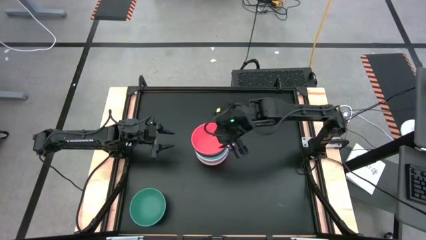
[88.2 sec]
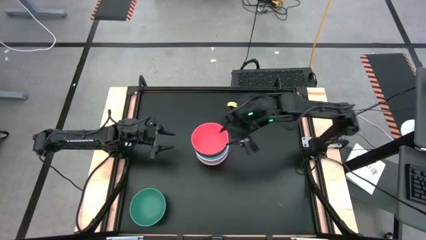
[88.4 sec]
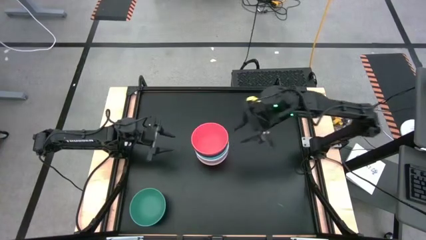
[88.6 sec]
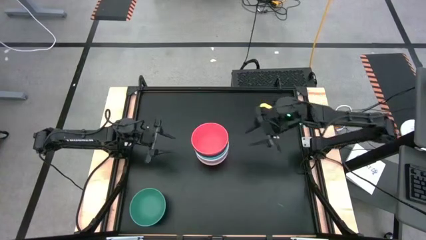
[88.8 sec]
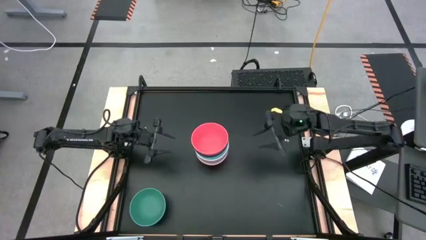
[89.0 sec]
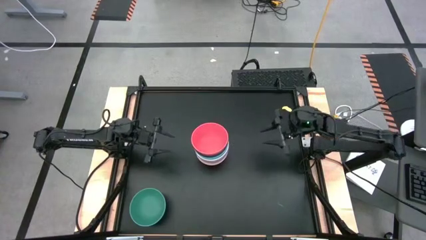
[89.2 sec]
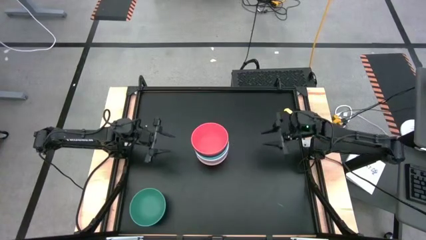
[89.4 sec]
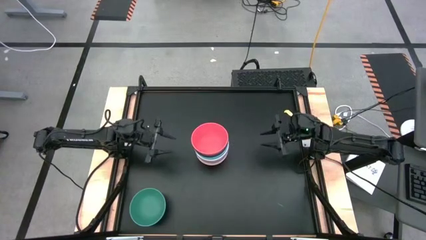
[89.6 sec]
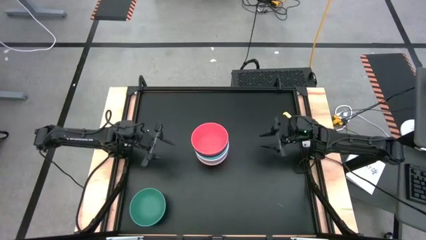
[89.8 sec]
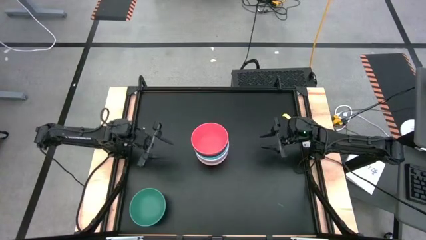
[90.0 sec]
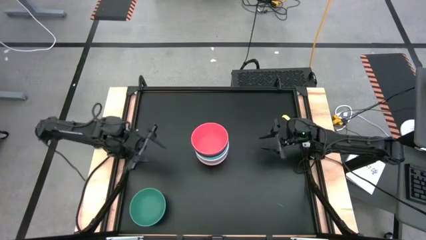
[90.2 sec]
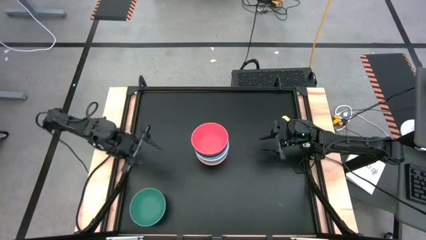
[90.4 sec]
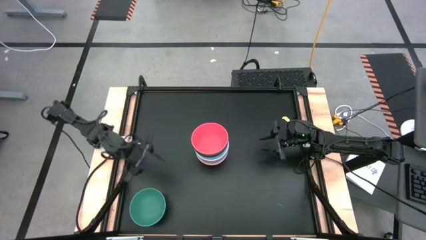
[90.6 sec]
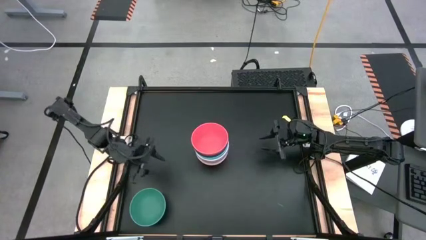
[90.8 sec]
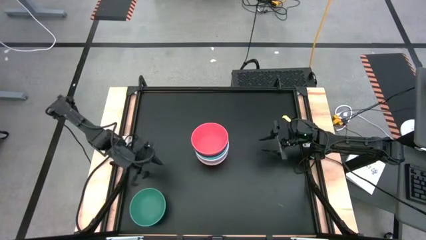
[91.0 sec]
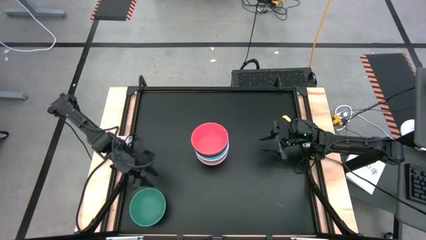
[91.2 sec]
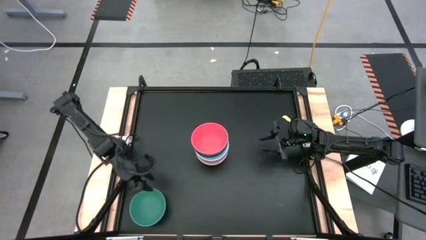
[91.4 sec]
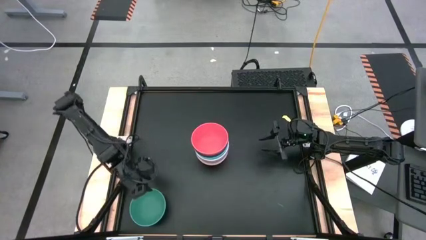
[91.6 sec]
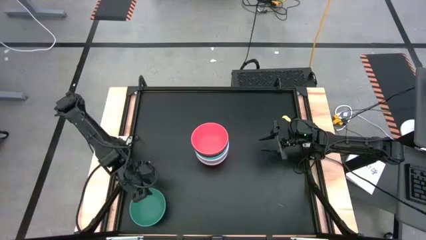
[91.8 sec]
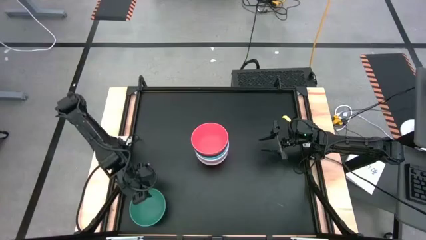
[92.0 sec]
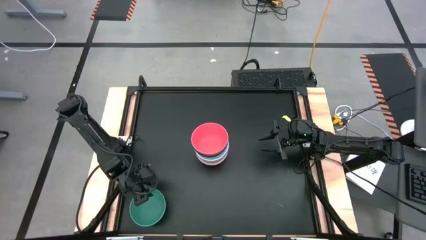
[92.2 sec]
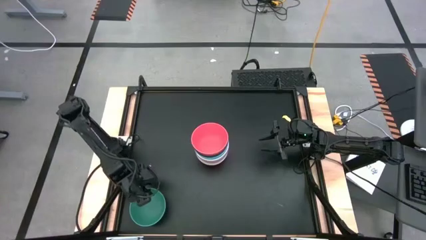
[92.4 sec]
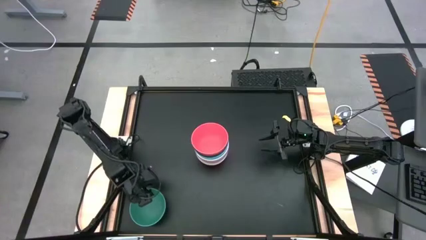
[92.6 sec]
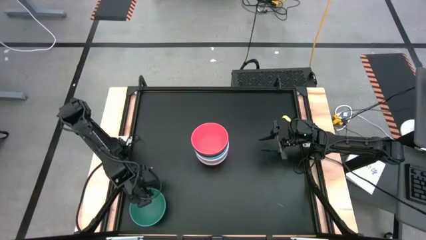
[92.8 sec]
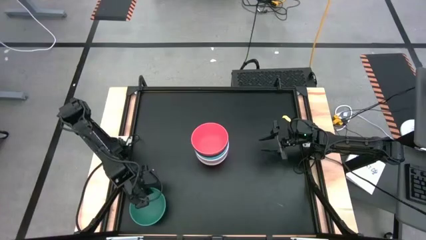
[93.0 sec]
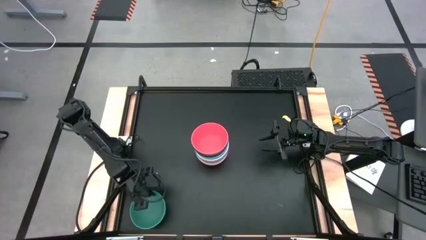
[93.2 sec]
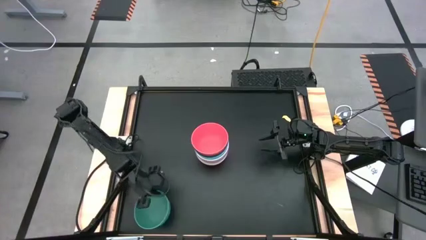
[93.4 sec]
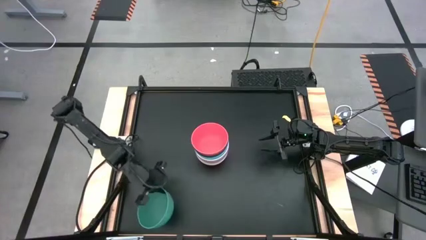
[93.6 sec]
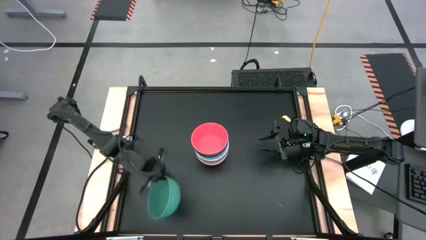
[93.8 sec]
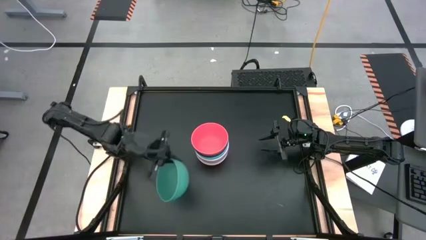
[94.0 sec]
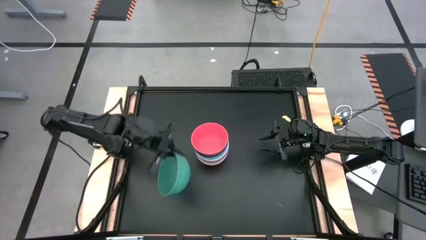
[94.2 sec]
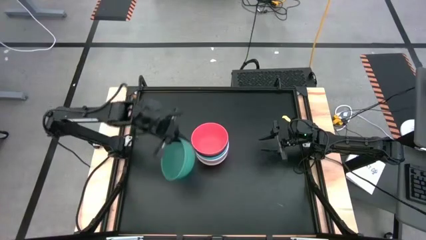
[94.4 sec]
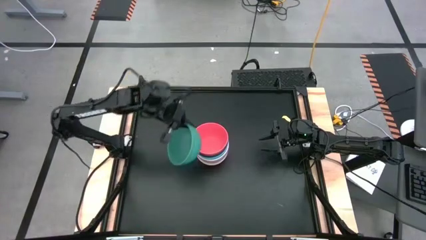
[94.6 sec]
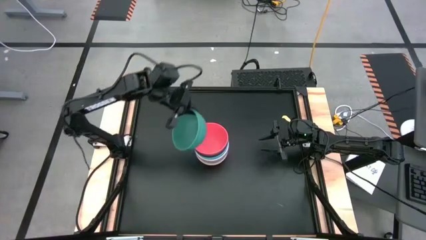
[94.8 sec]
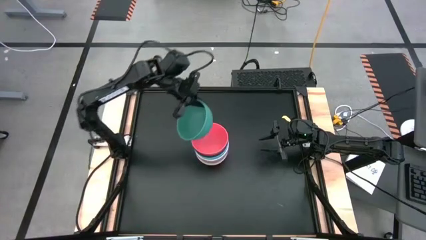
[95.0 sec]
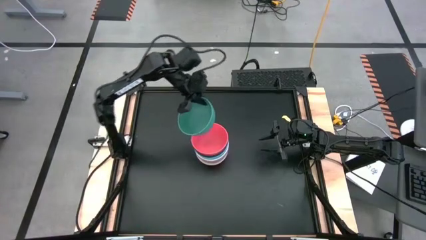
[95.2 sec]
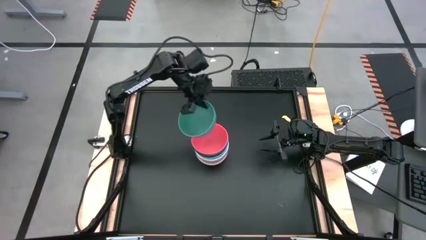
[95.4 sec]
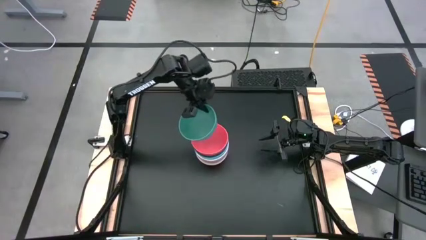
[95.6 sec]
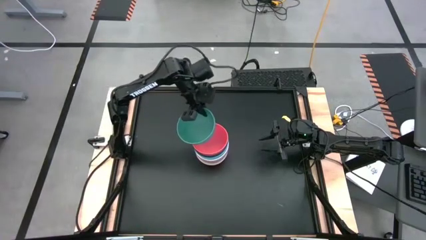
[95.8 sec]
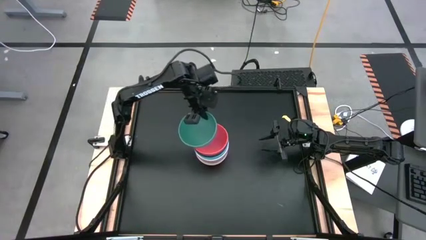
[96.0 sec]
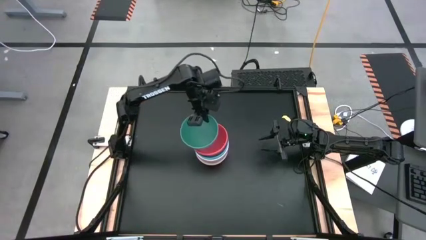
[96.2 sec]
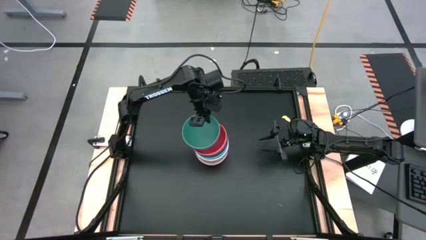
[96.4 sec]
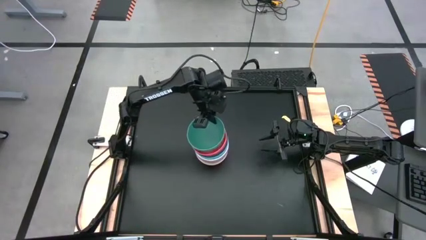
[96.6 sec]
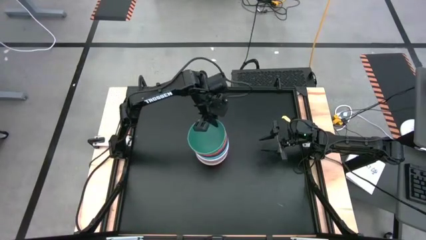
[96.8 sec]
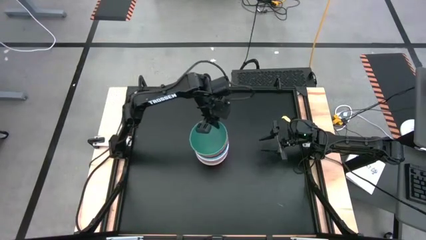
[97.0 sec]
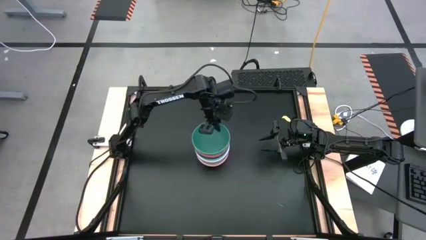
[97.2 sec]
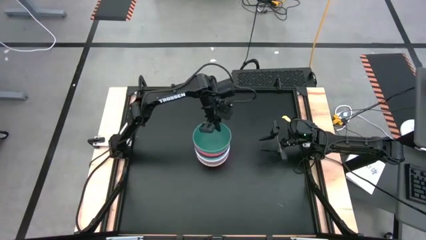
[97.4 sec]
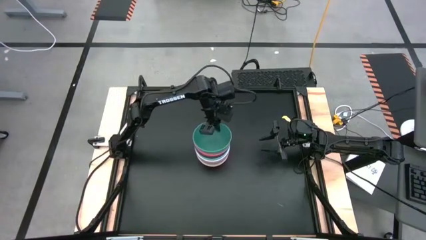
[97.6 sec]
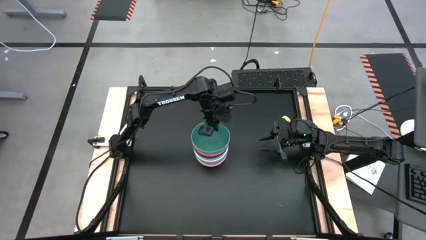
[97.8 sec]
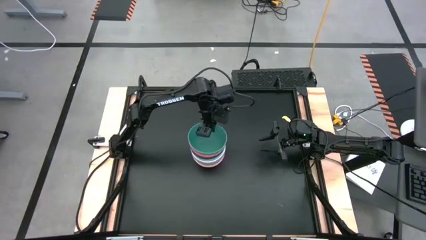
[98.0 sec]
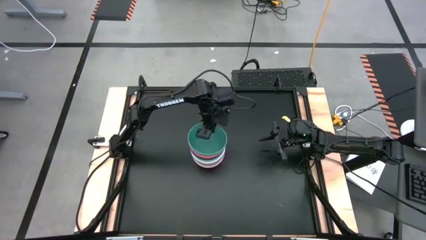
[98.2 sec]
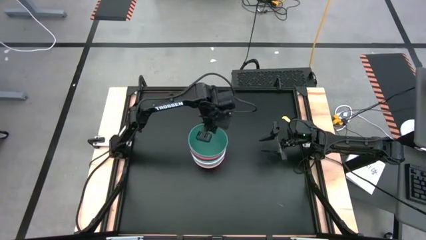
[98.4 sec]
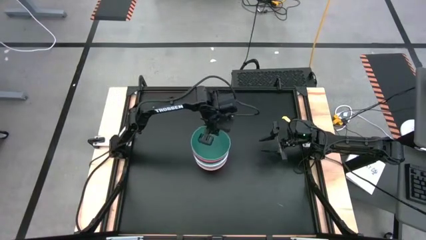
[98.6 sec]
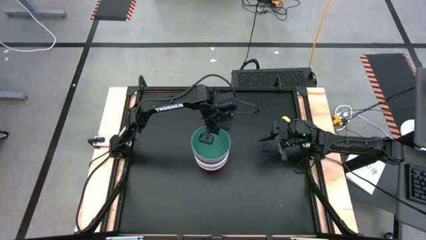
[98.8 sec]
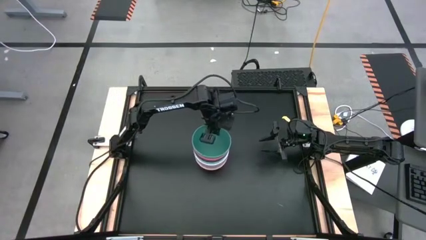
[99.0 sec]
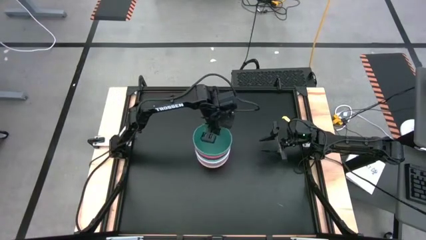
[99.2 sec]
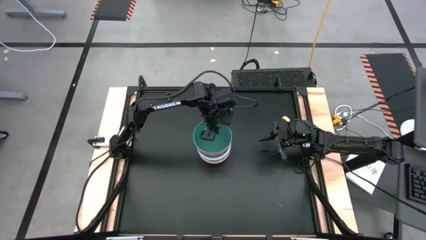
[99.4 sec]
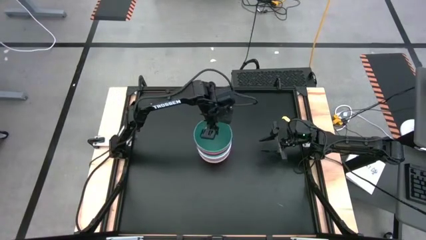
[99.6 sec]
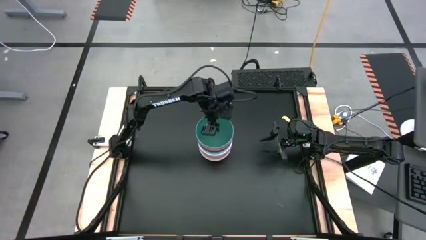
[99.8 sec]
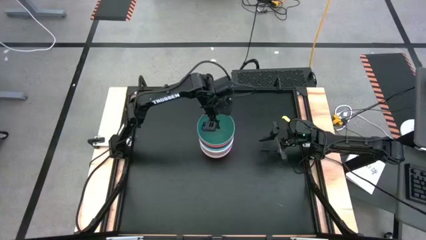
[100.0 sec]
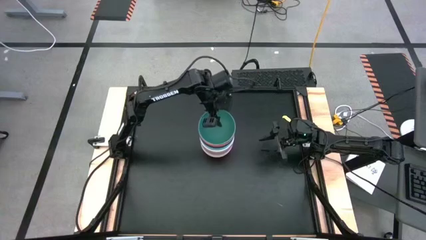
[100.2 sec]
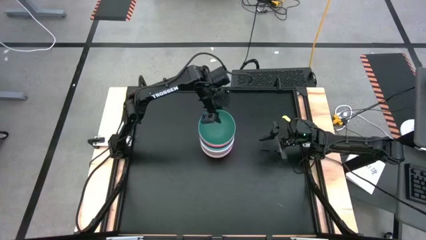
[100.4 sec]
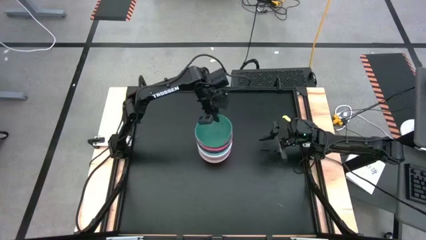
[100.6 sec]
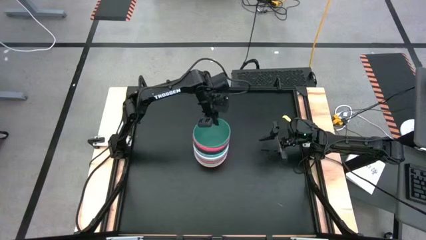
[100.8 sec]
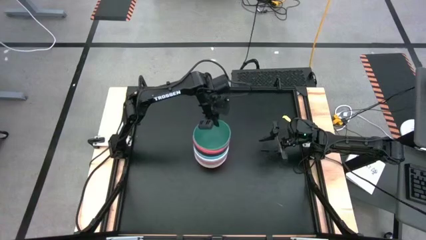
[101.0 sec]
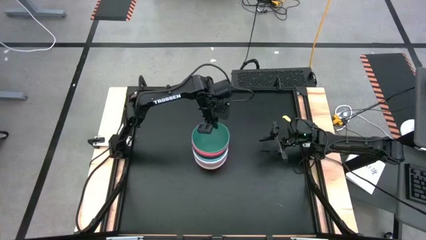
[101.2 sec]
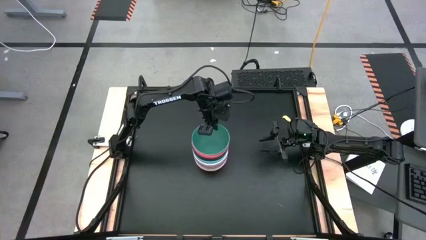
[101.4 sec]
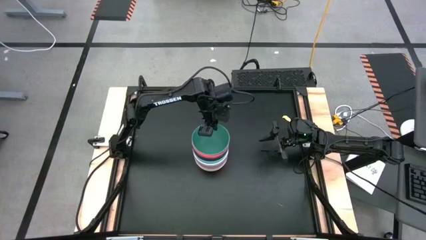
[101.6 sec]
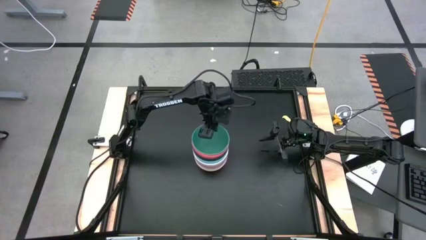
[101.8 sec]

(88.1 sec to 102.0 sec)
Task: Nest bowls inside each other
Stack the green bowl on top of the red bowl

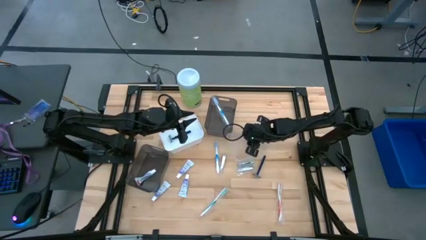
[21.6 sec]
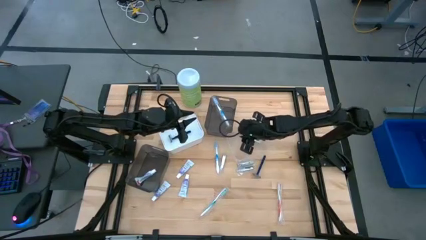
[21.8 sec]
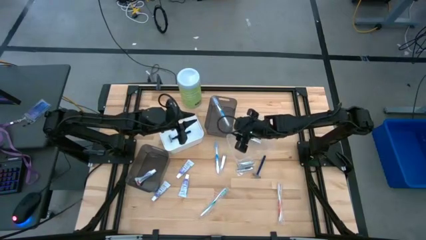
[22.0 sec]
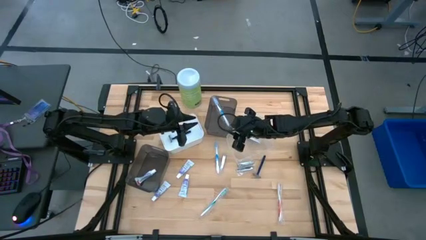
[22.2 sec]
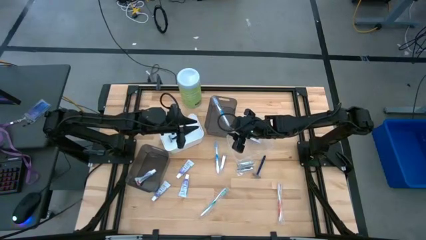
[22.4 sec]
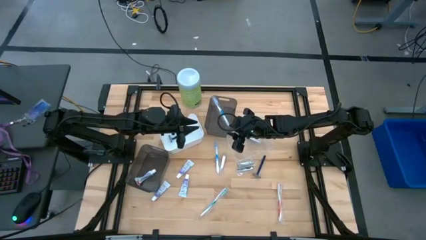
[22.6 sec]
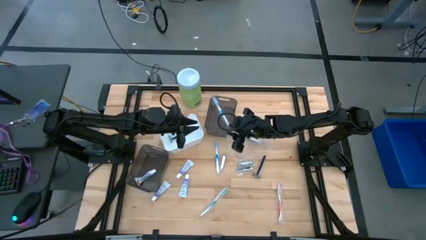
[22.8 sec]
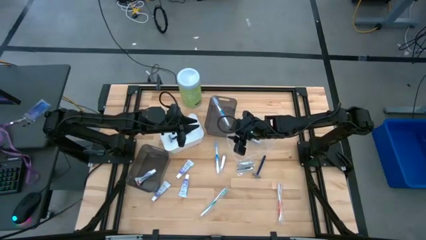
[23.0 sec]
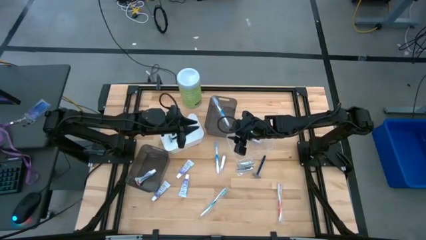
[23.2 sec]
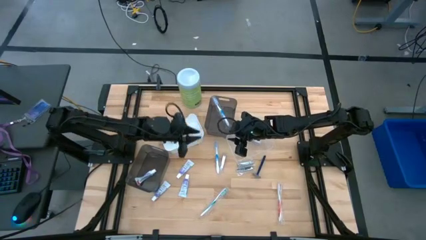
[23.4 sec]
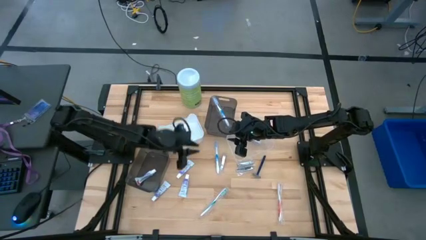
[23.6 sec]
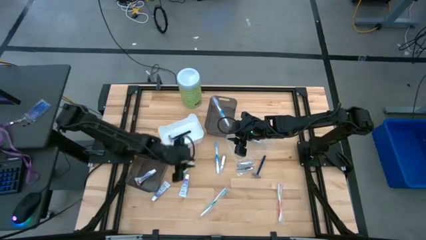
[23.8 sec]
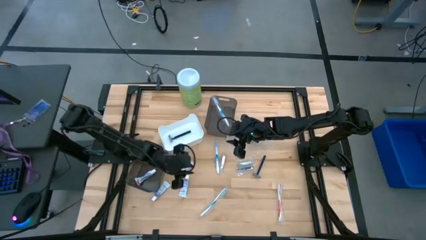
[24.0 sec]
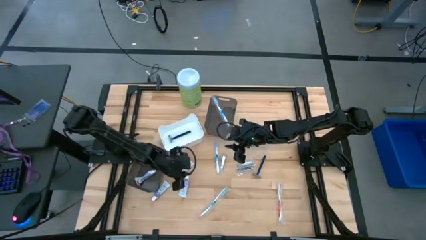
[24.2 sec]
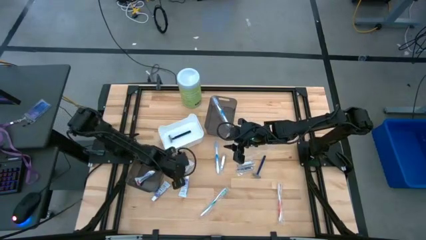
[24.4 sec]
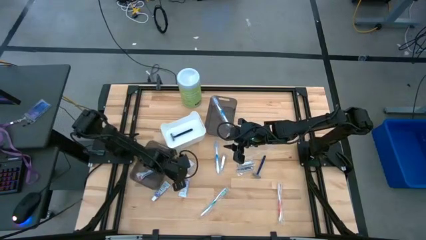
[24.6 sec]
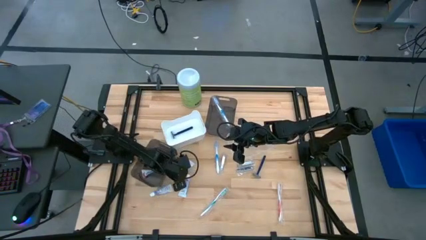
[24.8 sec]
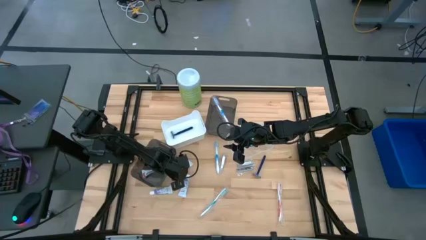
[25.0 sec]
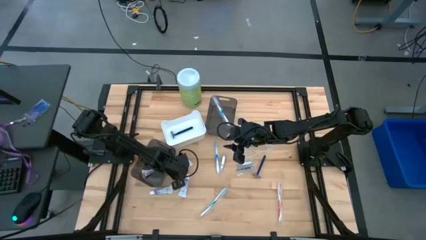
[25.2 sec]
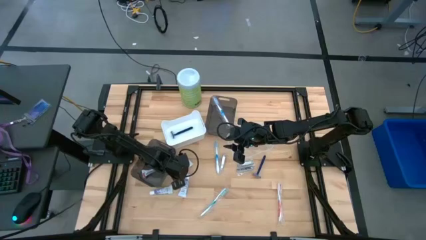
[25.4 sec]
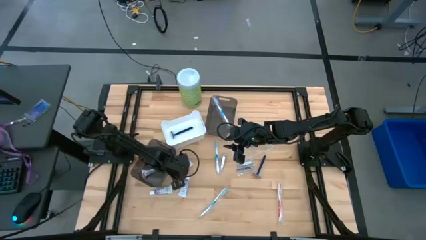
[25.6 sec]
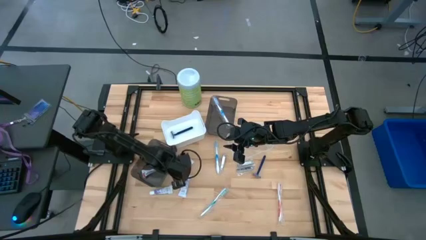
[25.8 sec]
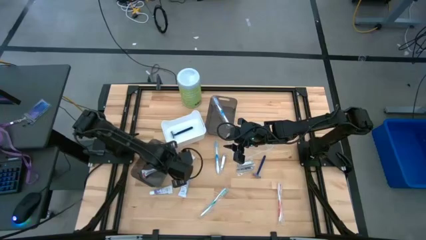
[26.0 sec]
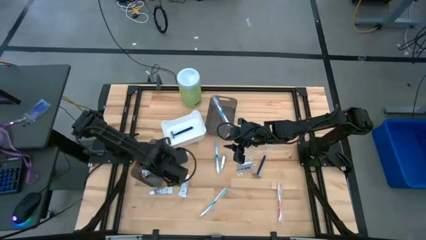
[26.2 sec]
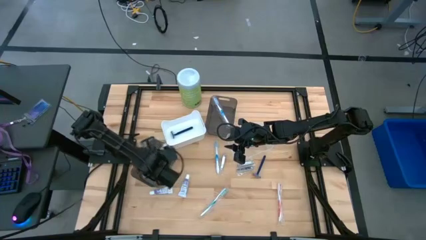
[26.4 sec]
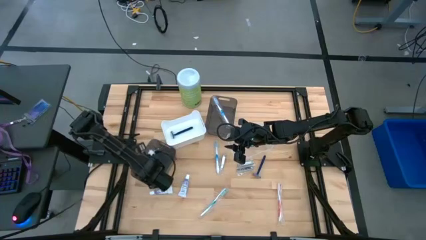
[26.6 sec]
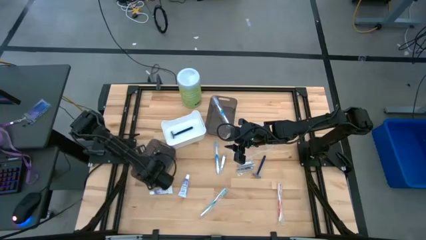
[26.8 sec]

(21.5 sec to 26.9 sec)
Task: Pick & Place Travel size toiletries
Put the purple toothpaste into the bottom black bin
